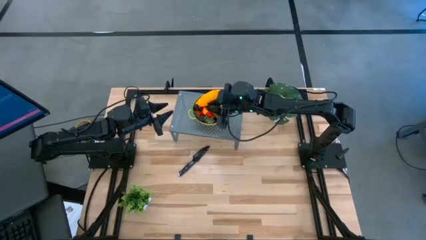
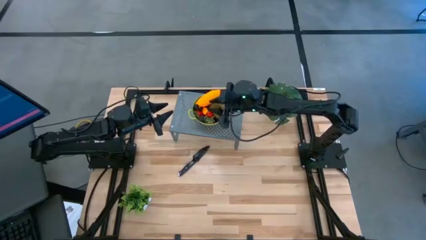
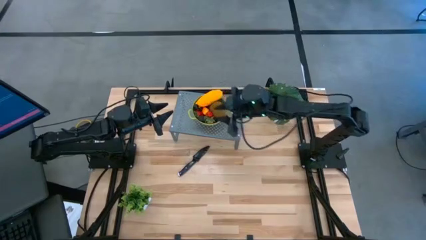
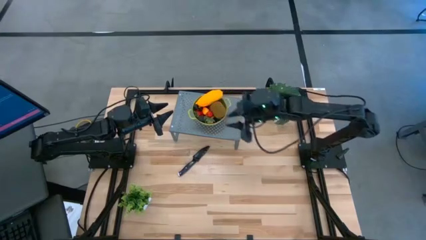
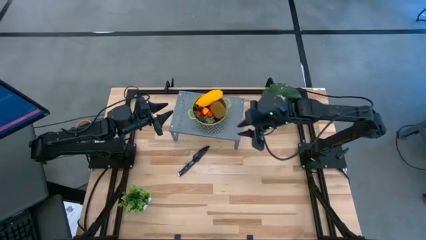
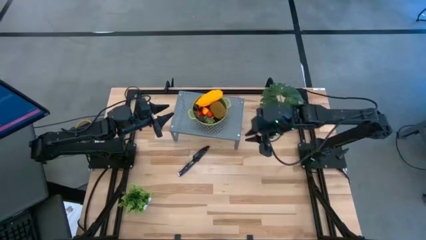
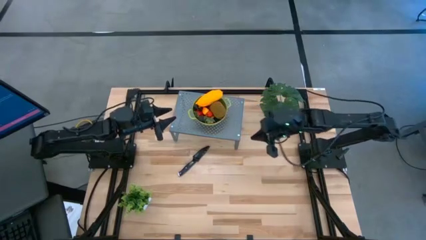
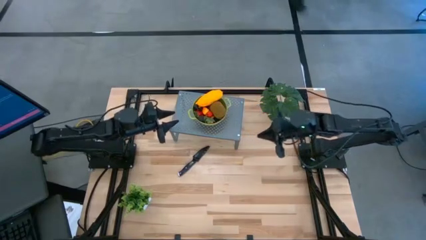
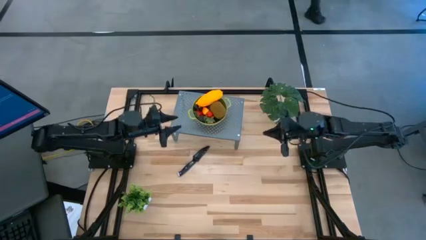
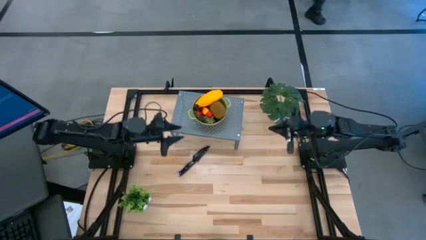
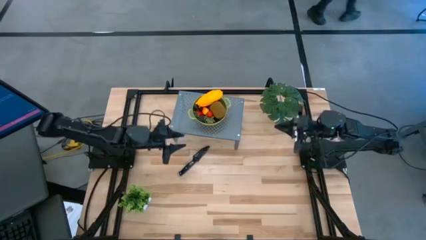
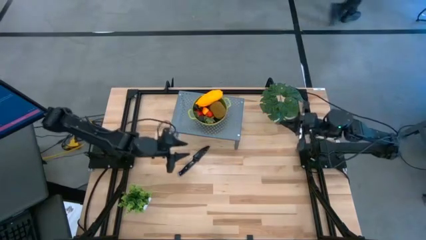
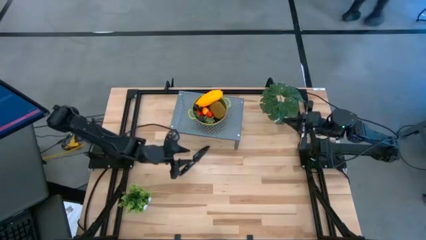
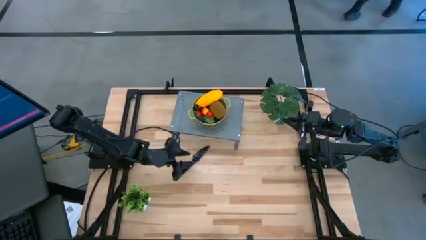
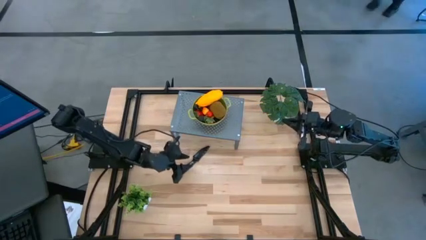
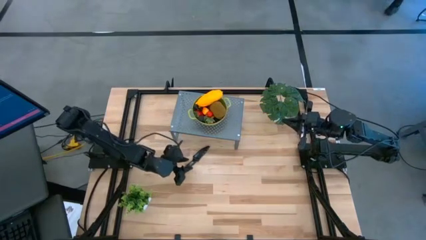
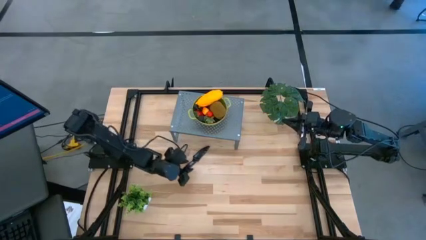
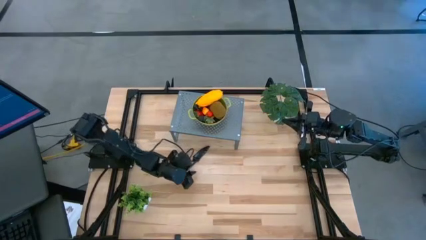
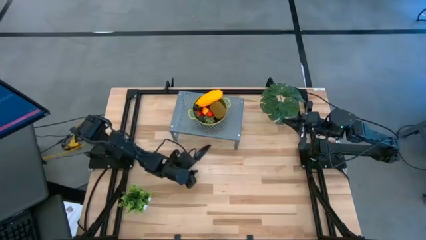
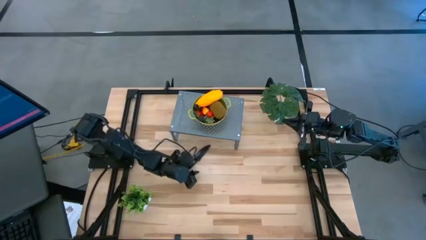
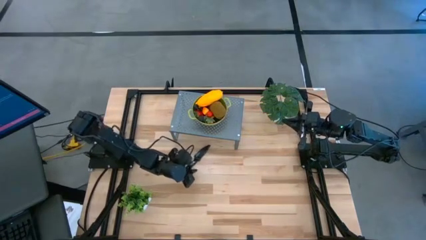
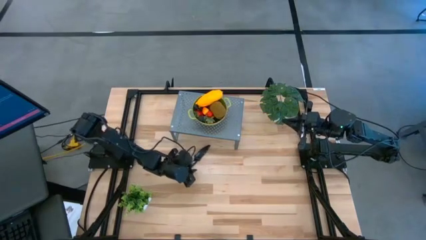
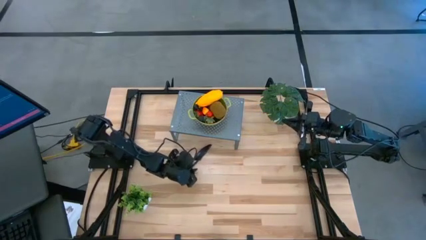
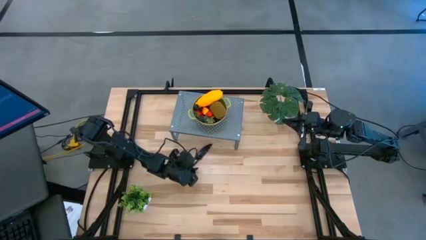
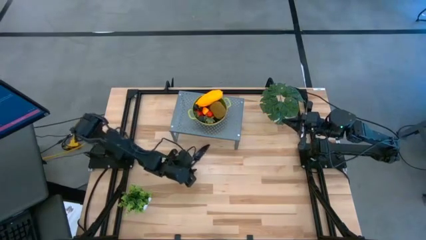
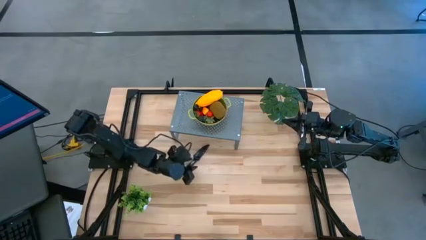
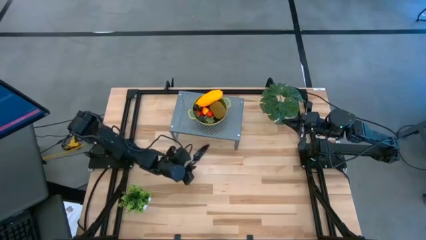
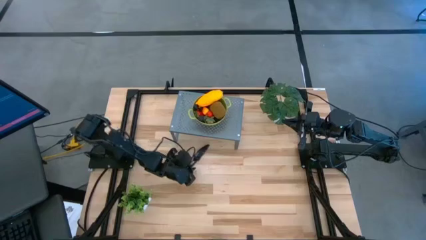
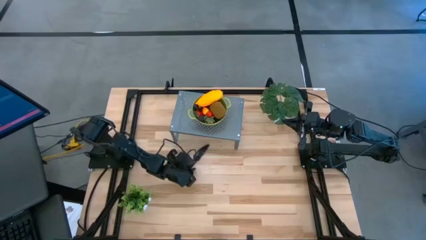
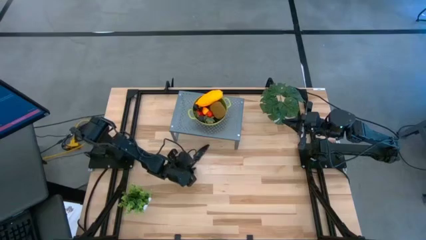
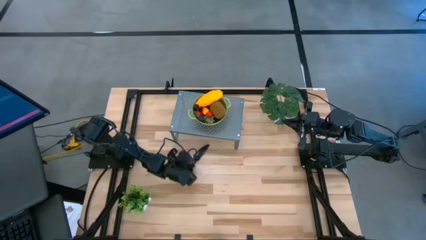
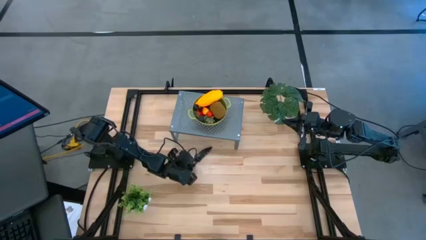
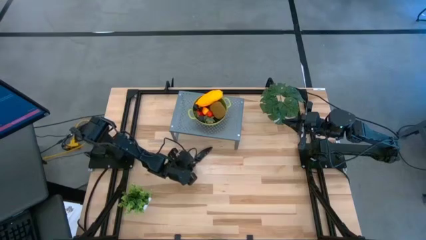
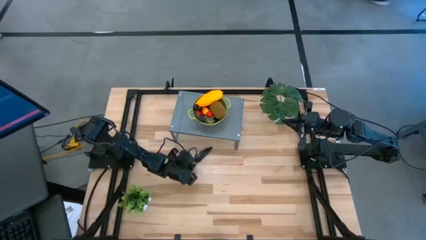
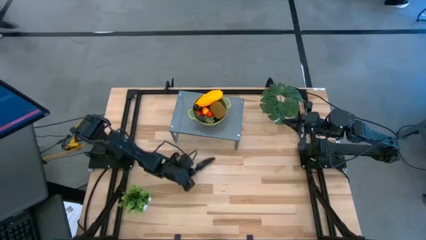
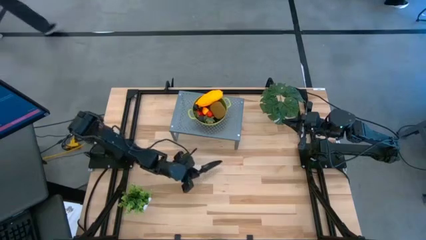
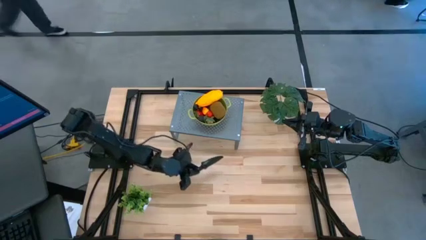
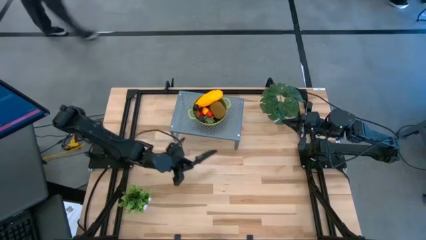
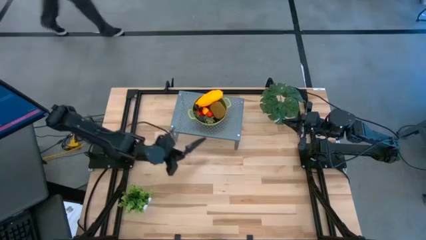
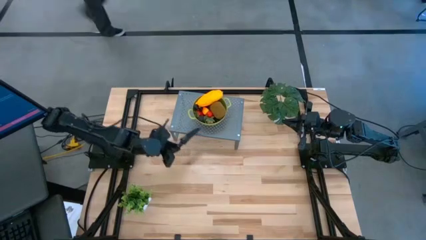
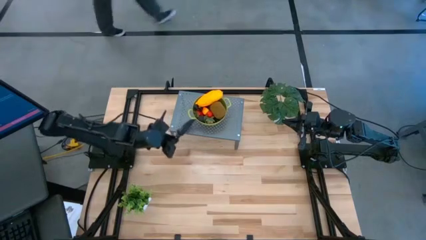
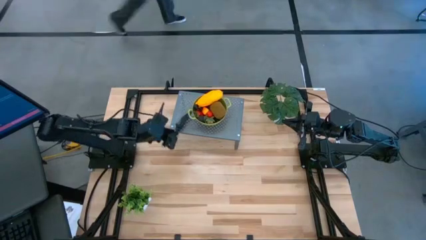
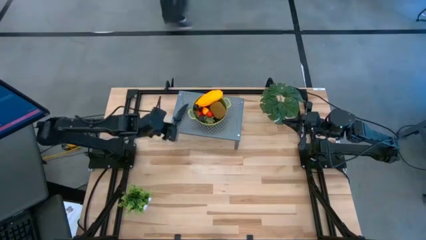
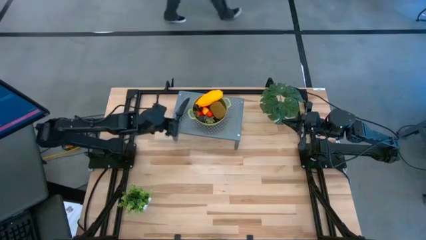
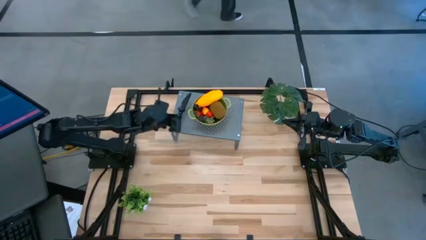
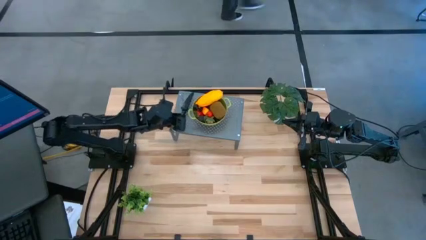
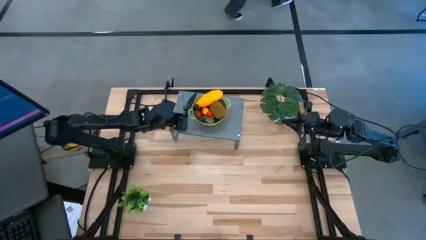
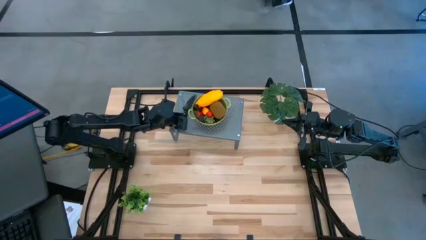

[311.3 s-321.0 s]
Task: Pick & Place Fruit
Put the black kitchen knife on the shelf

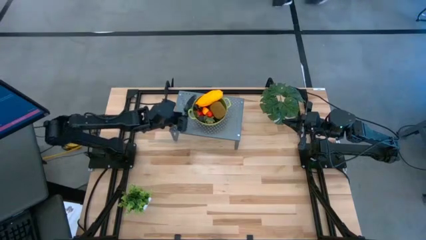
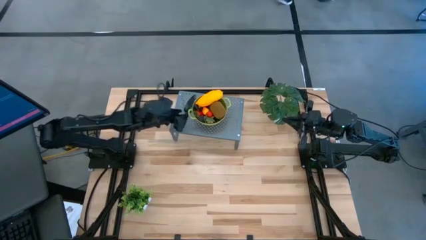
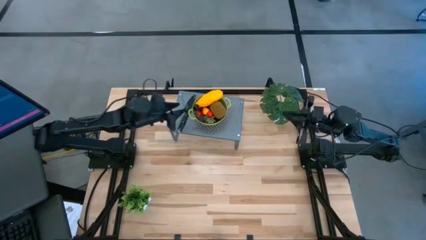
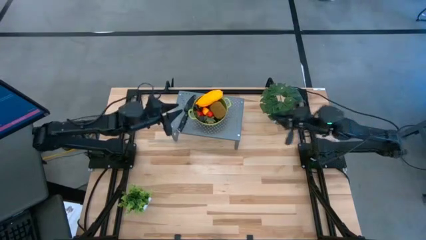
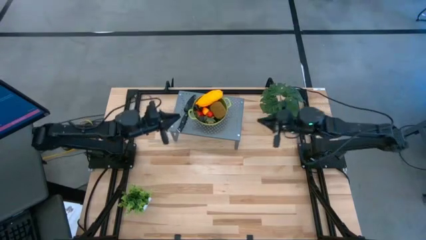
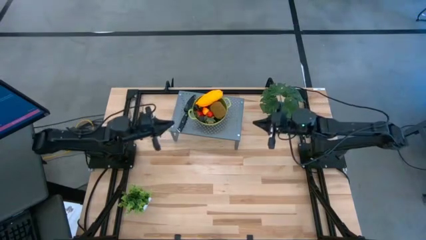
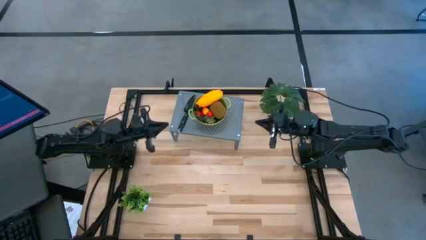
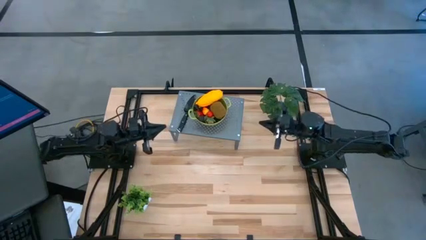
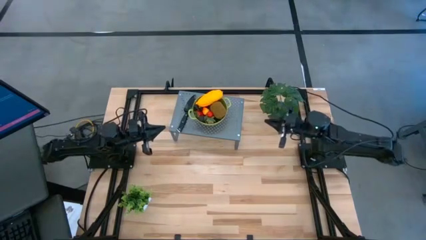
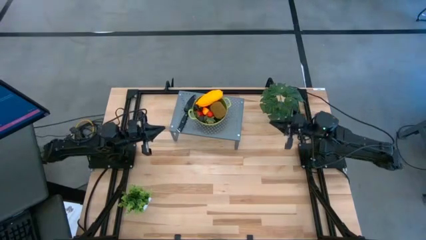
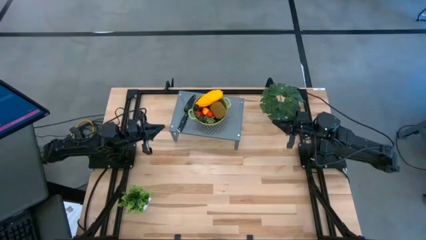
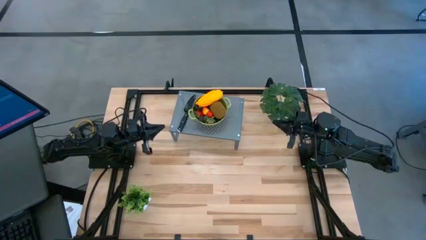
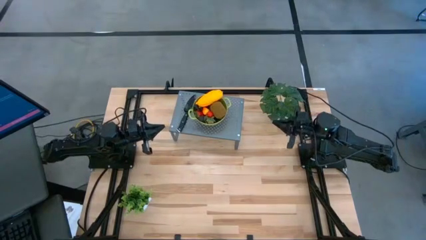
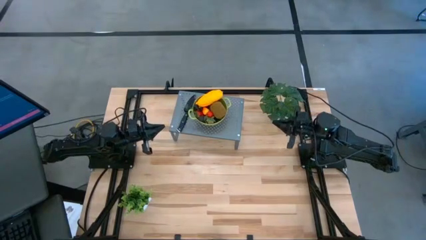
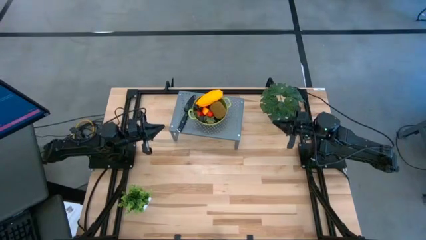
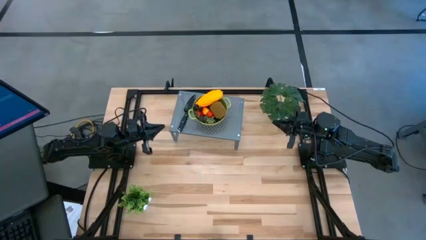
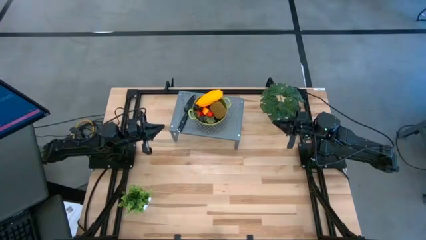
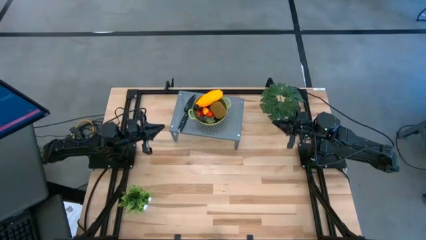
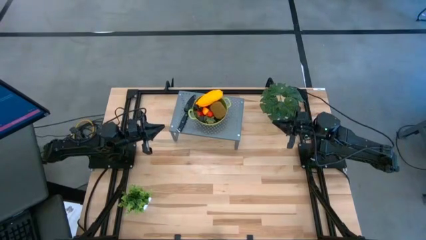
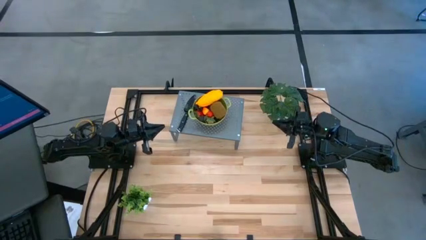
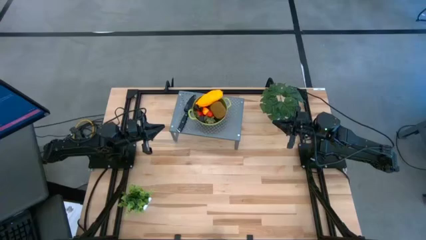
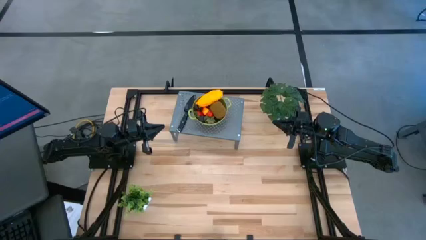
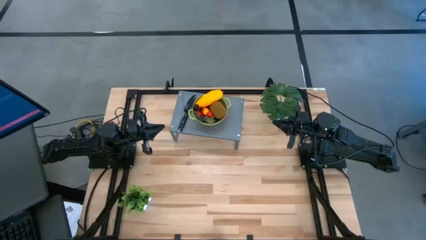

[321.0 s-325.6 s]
Return to Home Position

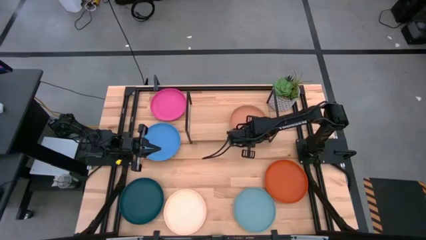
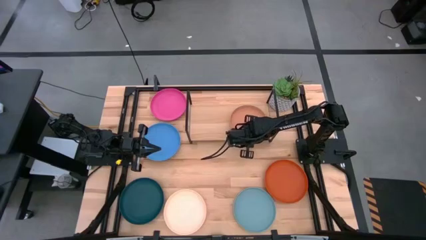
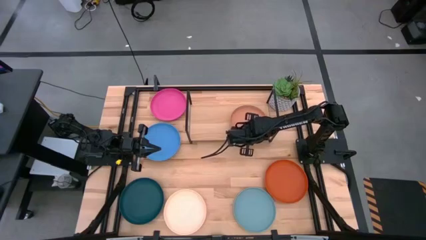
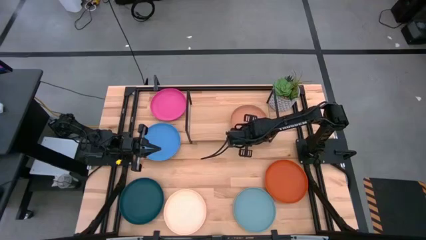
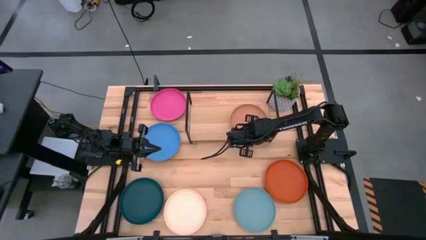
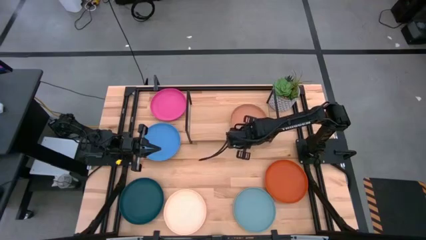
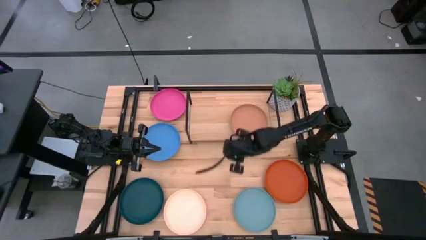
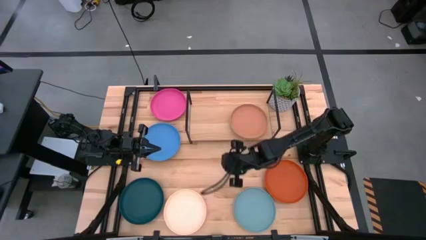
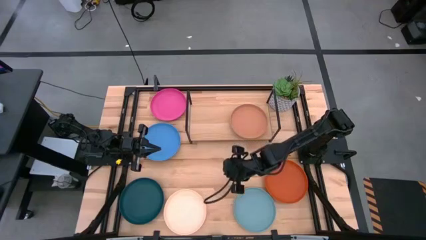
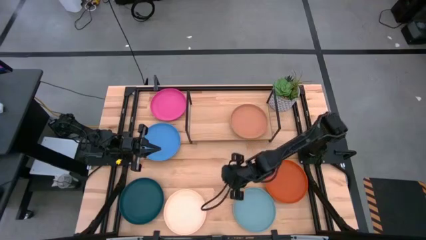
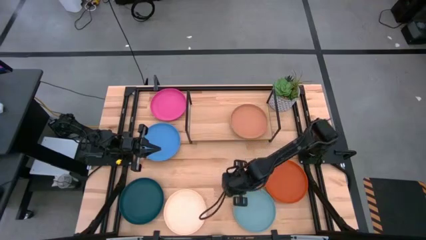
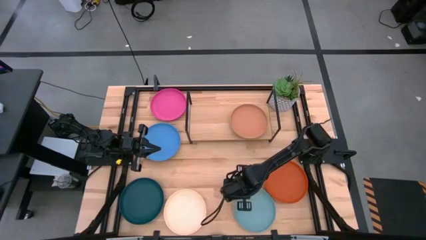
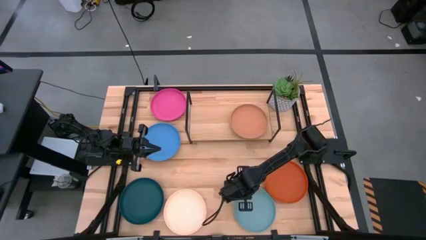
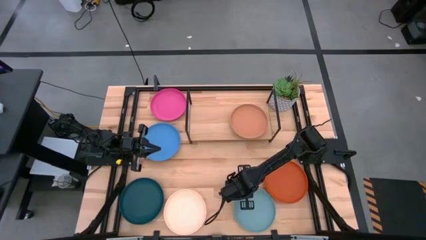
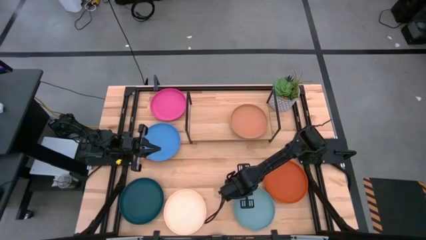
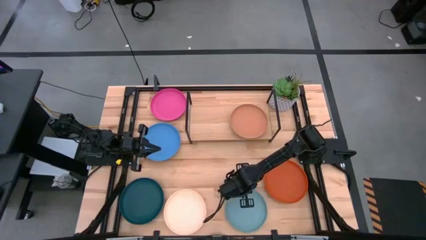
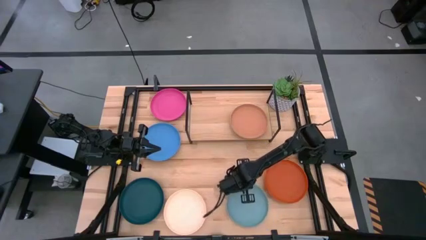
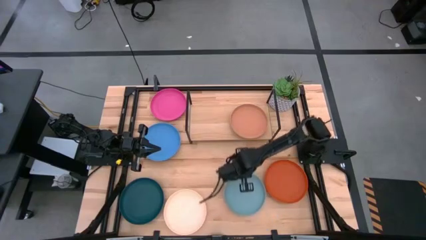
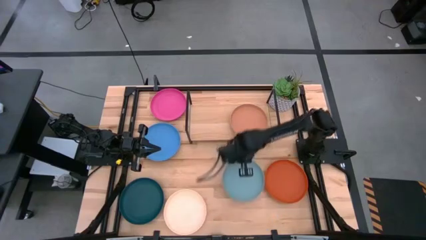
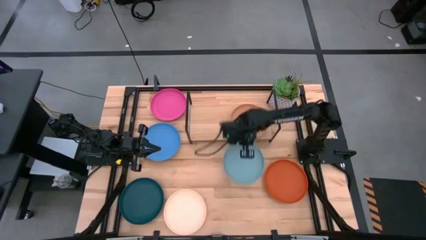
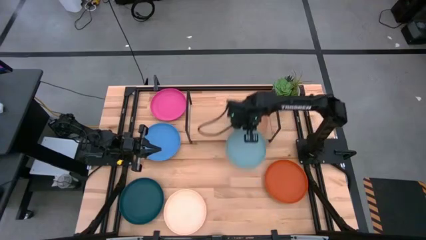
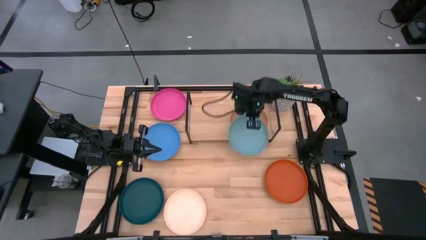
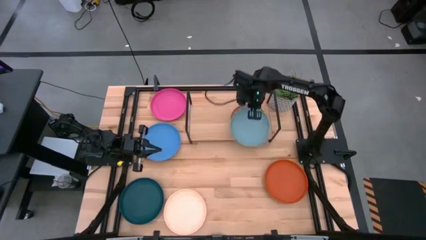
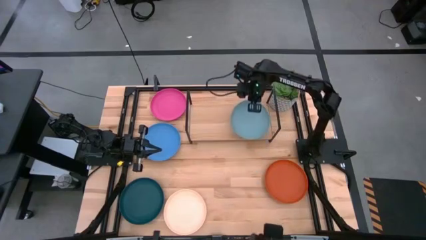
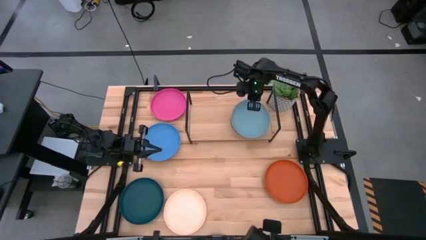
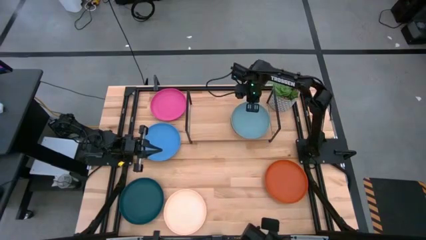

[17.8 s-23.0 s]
Task: Place and stack plates onto a shelf
Stack the light blue plate on top of the light brown plate on the shelf
